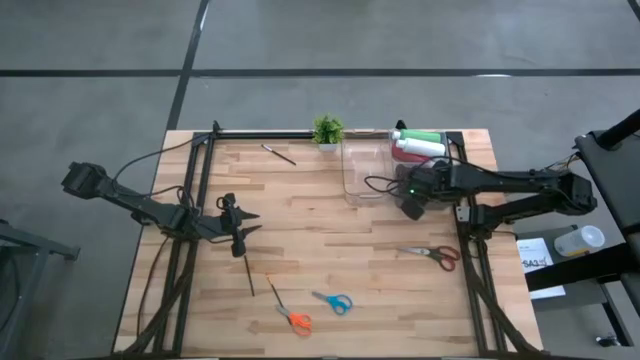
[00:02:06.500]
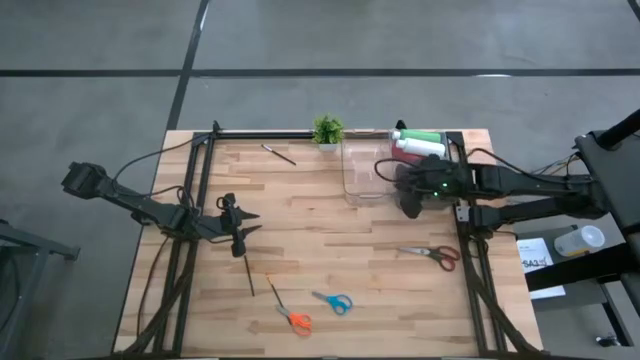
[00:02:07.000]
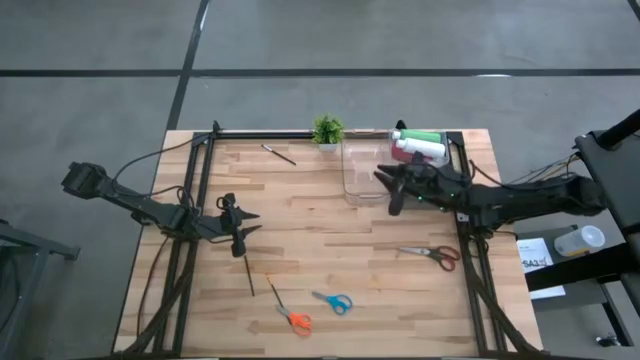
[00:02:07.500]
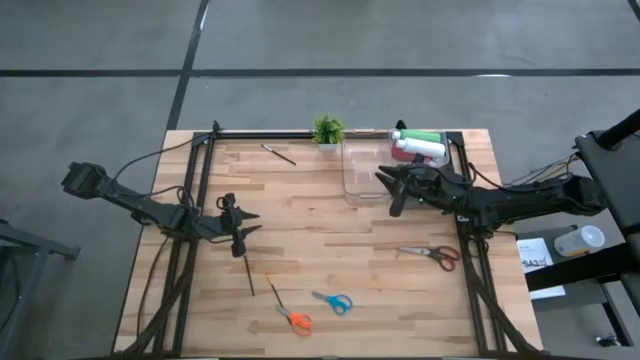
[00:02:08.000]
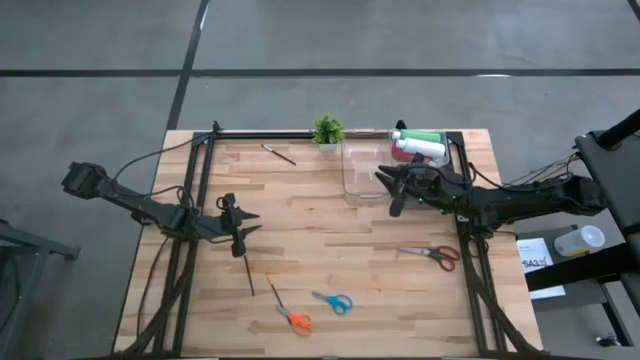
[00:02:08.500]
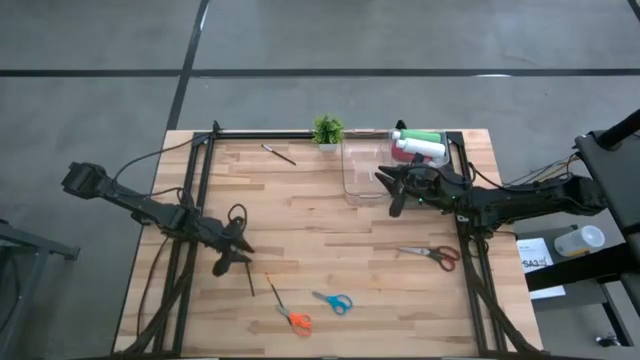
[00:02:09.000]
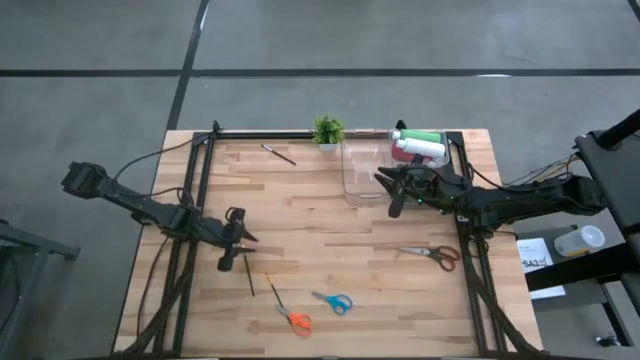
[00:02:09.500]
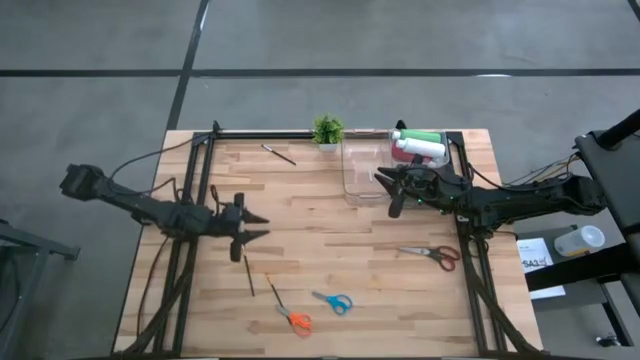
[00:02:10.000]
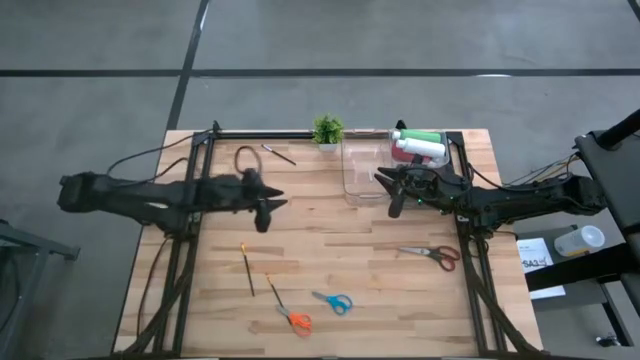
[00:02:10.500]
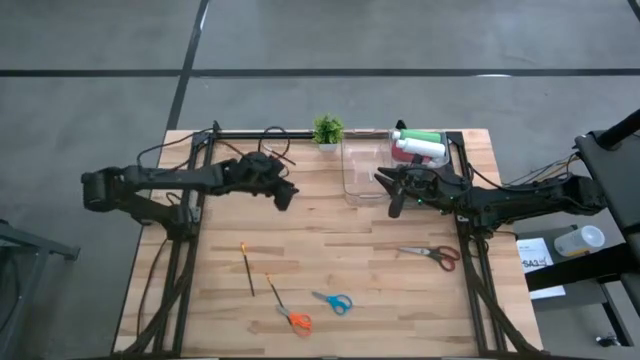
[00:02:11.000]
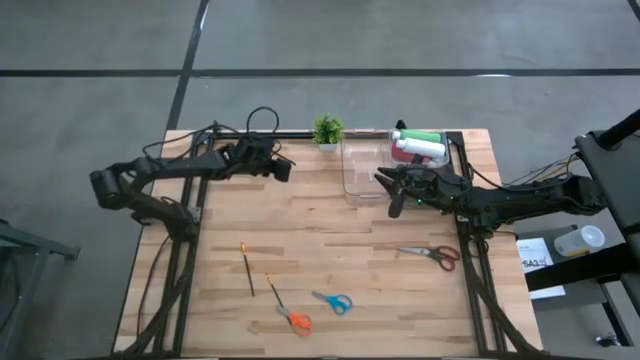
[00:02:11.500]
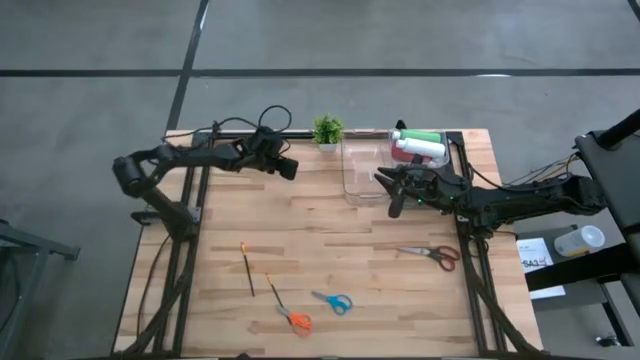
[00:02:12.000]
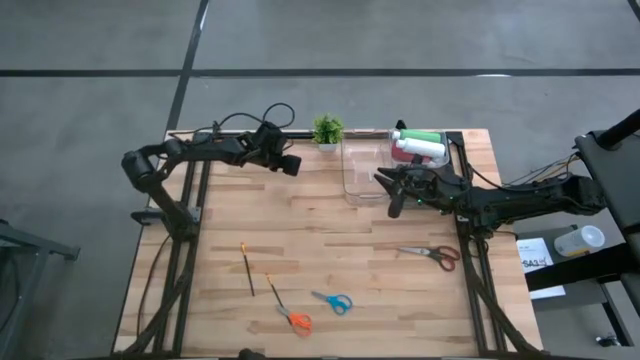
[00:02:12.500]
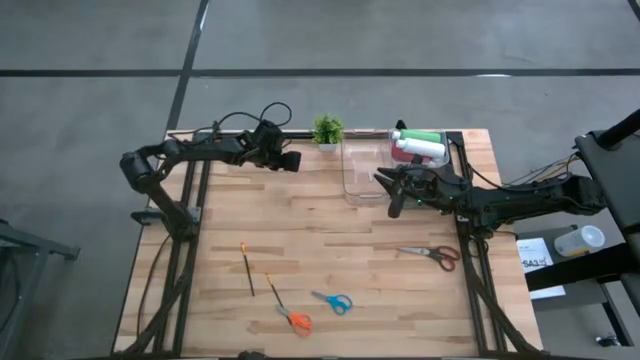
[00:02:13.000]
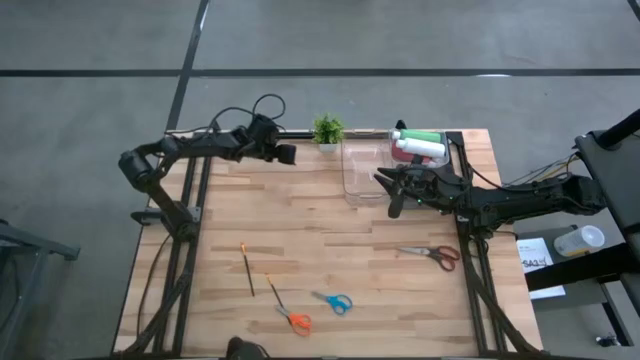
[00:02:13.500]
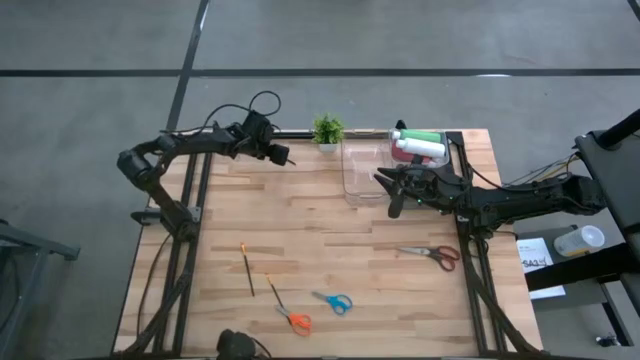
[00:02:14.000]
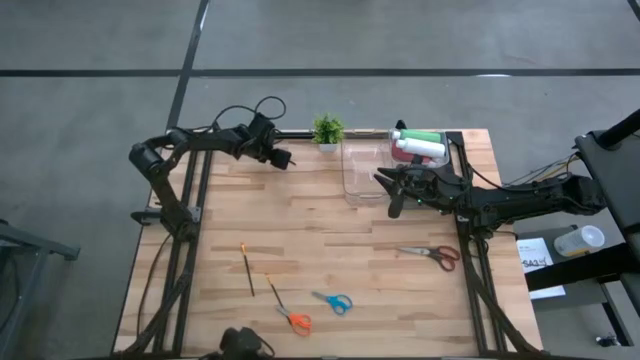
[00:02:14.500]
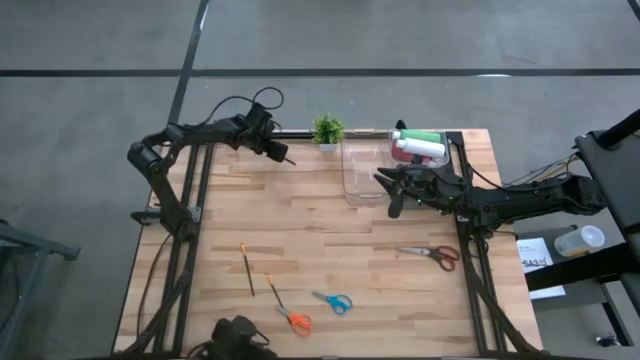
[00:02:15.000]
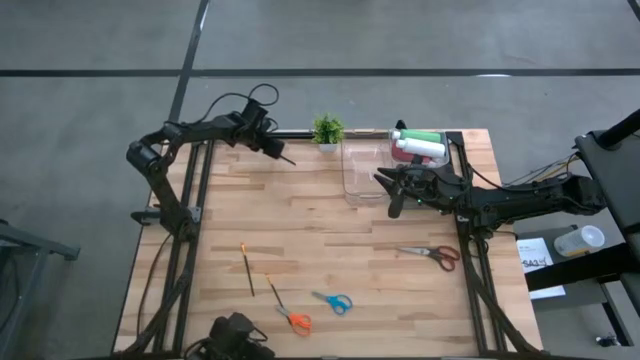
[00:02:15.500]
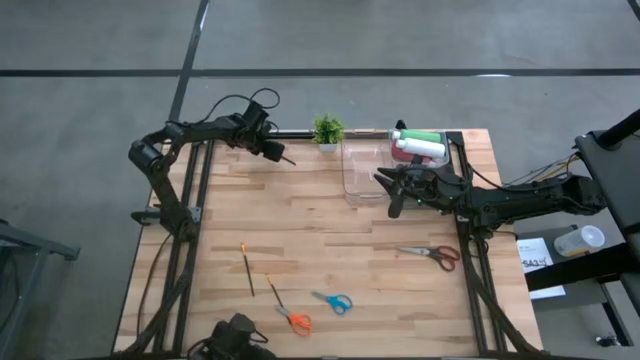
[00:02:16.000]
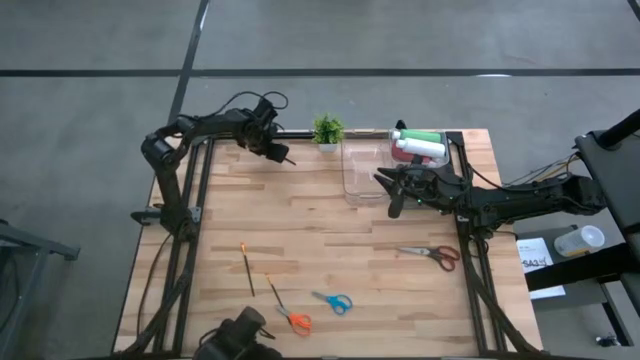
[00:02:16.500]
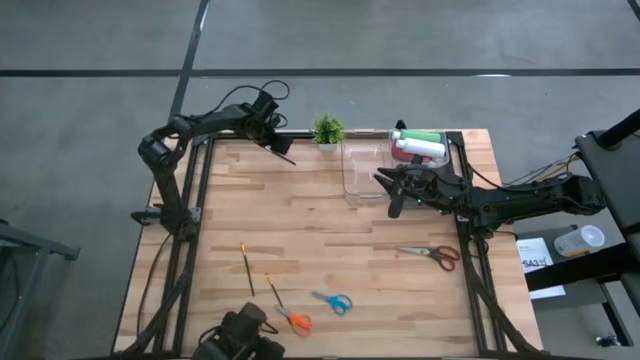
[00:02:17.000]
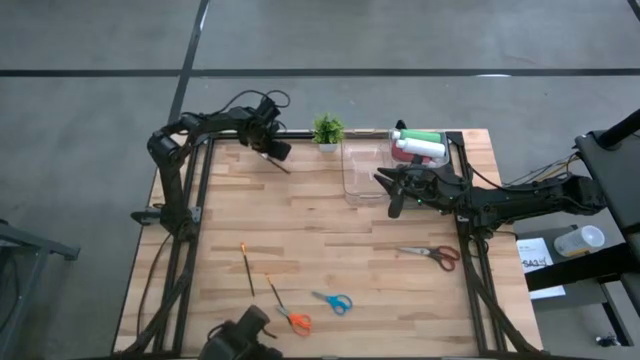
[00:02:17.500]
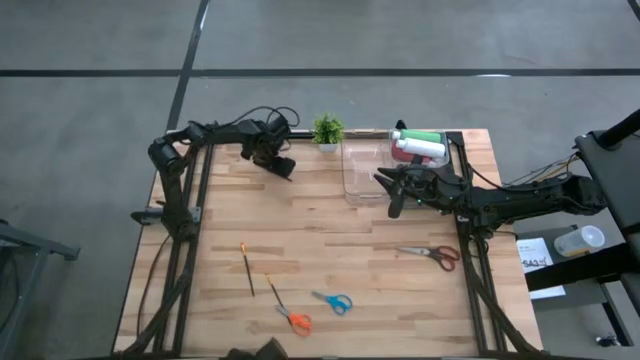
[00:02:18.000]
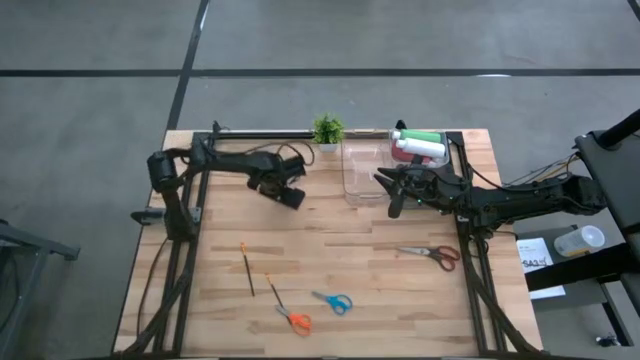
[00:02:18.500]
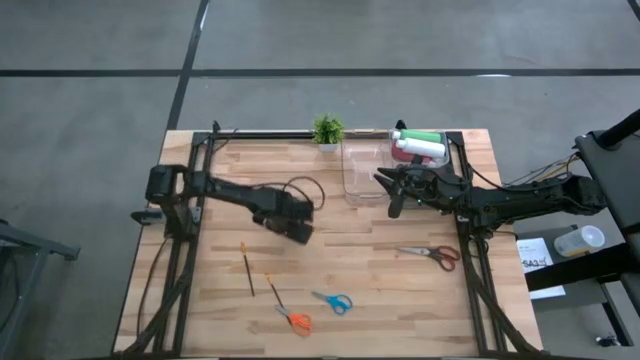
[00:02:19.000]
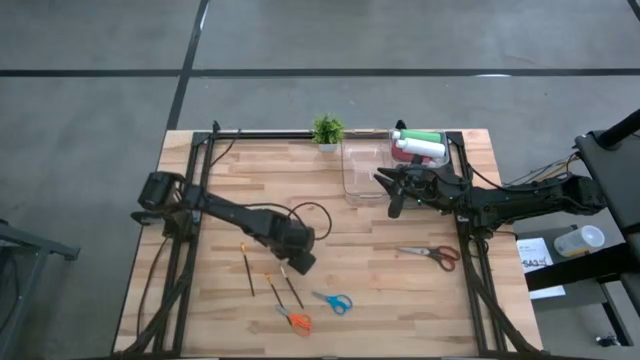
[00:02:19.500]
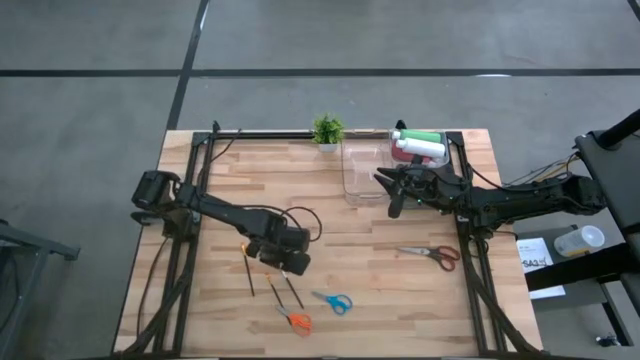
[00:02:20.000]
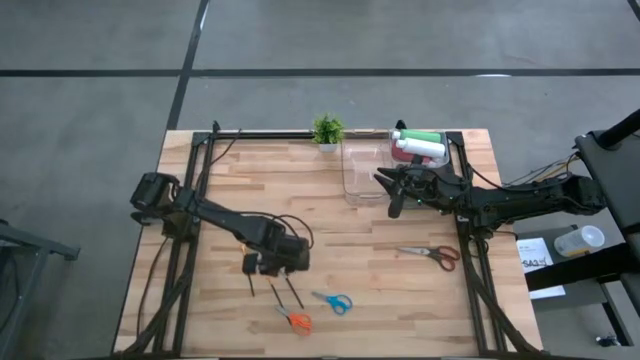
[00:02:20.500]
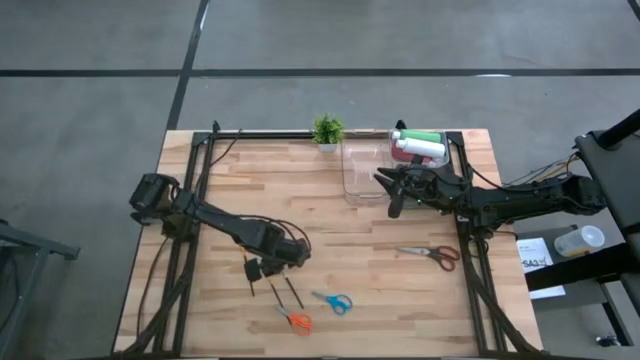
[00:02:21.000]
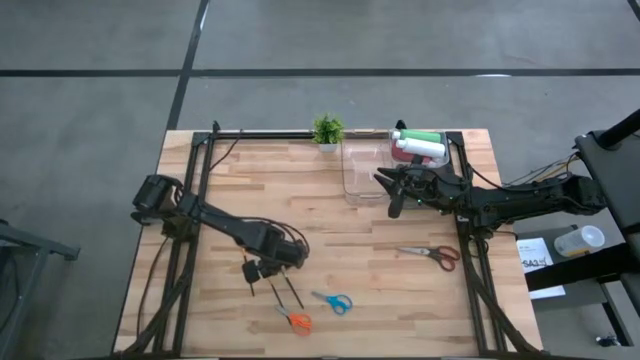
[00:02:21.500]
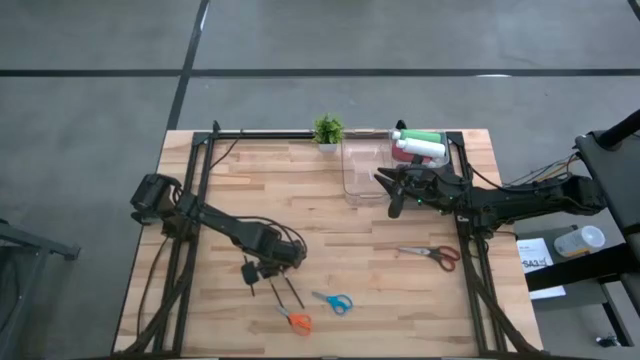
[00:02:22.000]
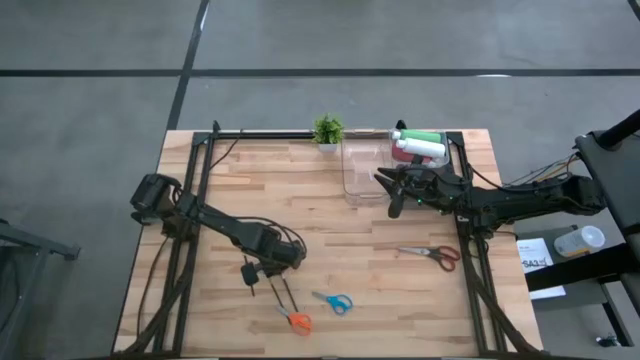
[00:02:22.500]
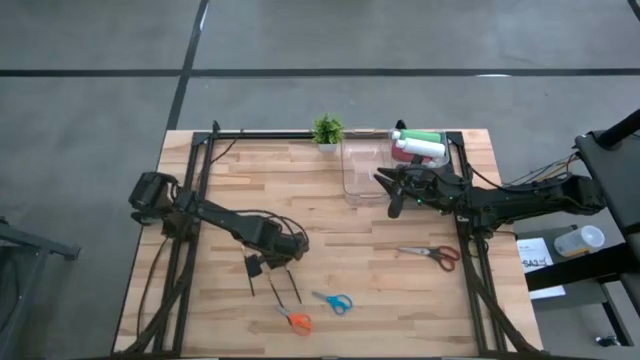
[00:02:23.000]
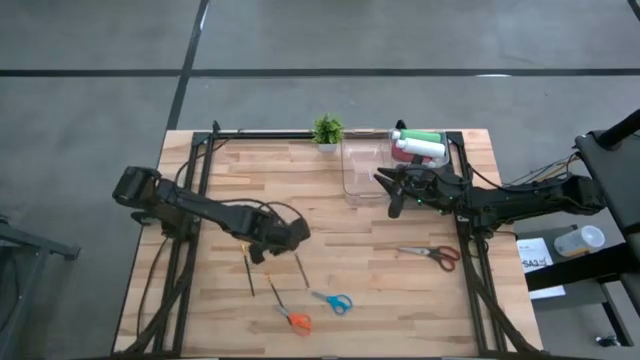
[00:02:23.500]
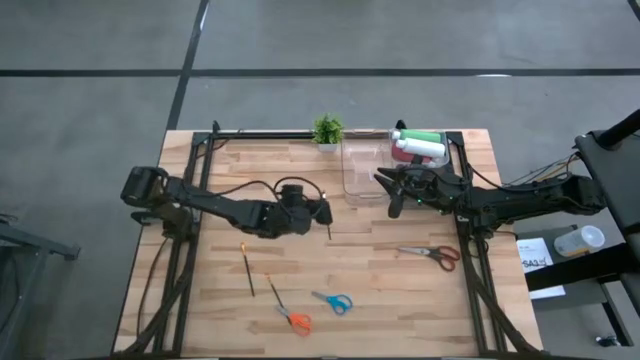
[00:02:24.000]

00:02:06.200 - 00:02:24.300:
Task: Pick & Place Paint Supplies
Put the silver paintbrush into the black bin

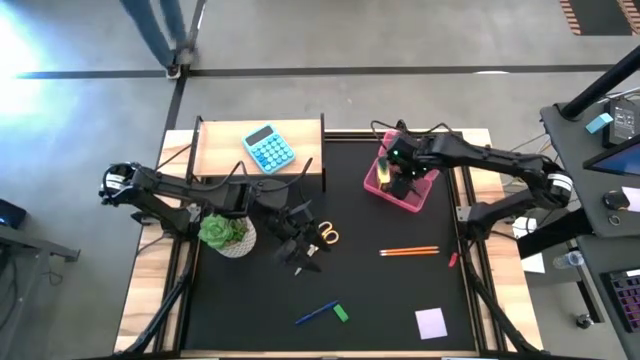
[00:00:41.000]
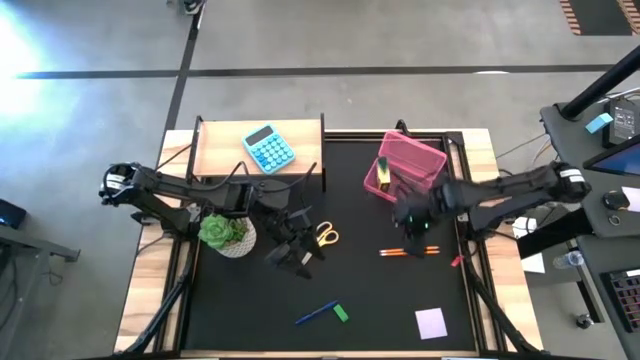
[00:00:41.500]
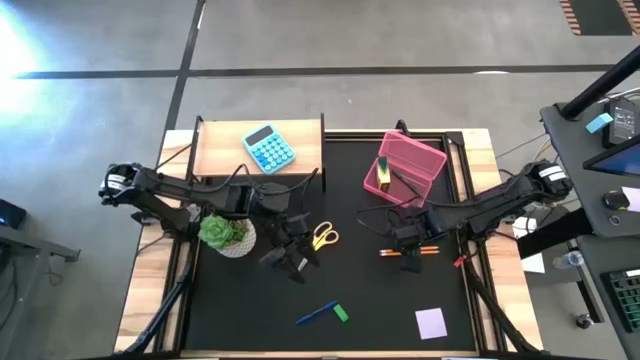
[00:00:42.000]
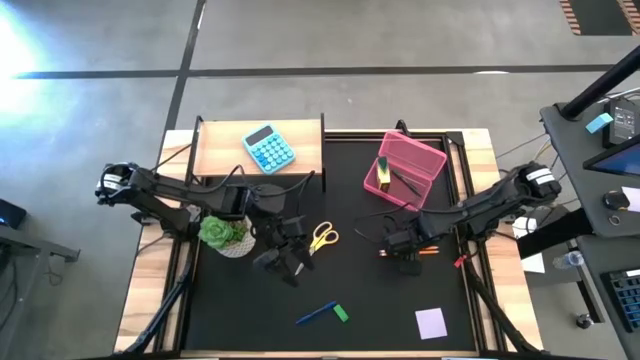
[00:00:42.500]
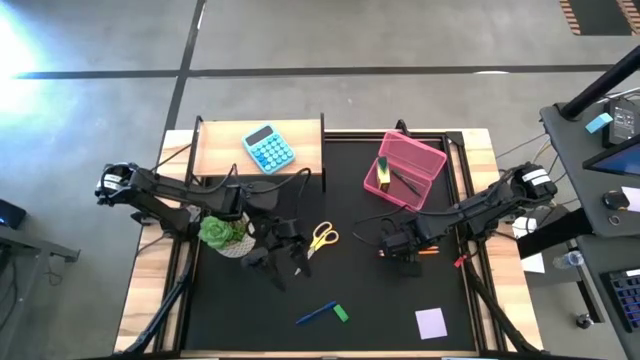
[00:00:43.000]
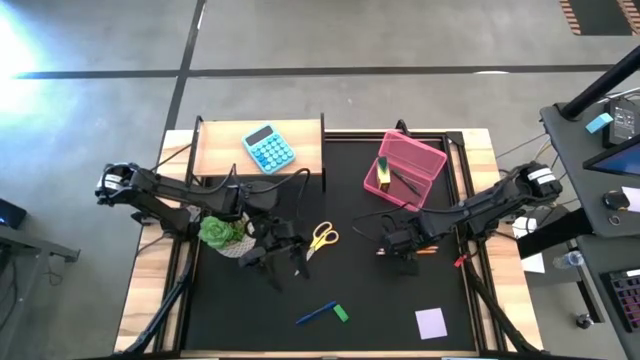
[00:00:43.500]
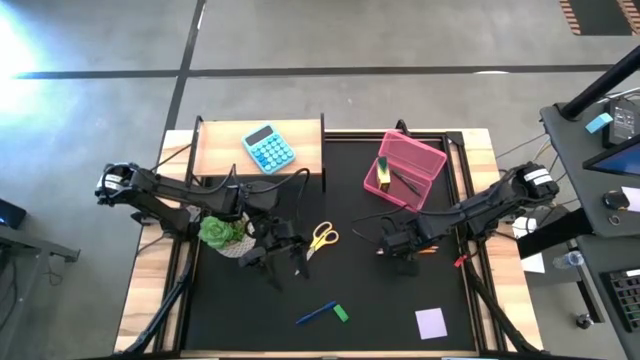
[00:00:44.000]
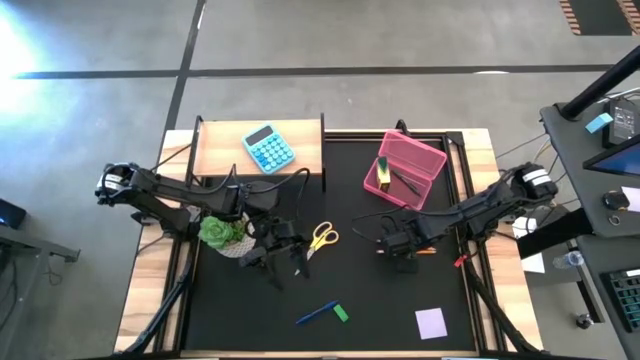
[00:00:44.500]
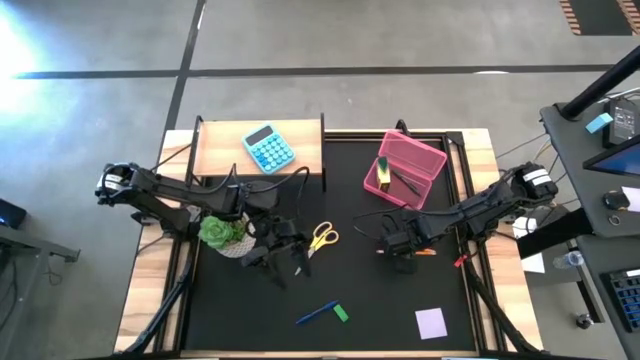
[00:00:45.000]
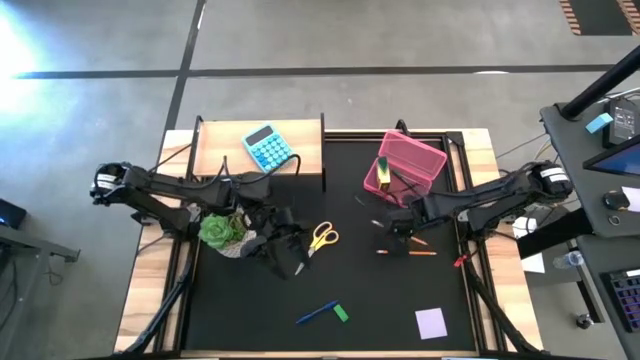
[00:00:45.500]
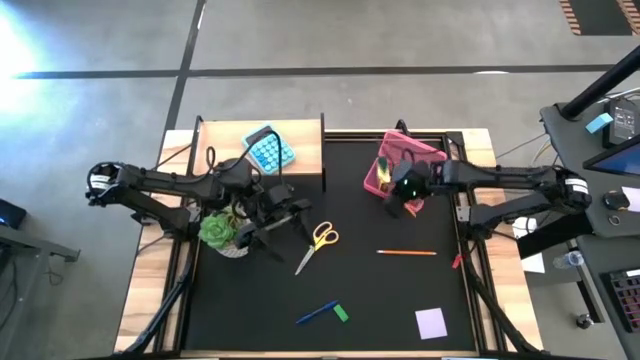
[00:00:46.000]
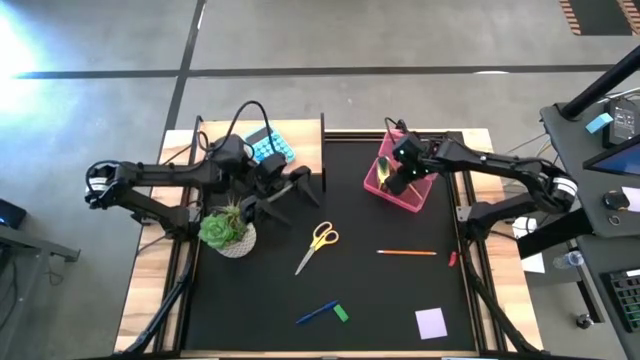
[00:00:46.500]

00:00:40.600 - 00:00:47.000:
Task: Pack school essentials
Put the top yellow pencil into the pink supply box
